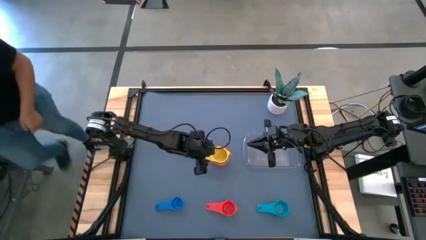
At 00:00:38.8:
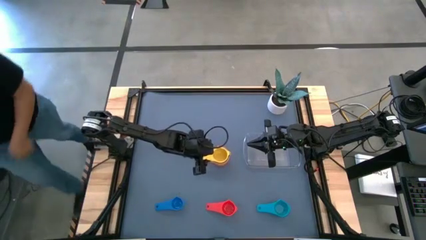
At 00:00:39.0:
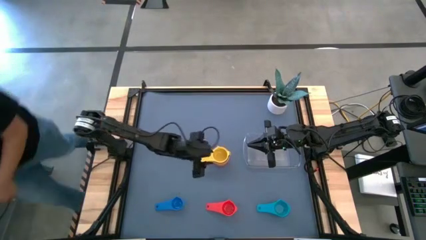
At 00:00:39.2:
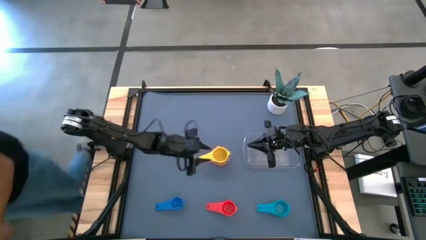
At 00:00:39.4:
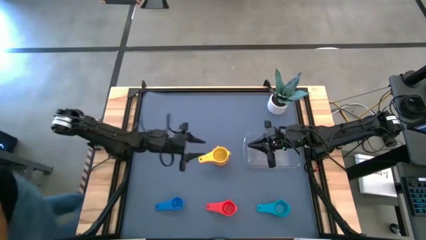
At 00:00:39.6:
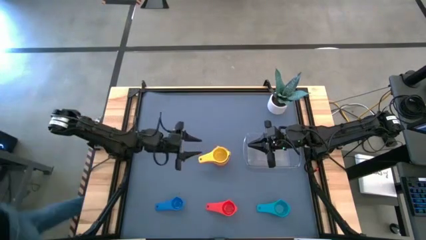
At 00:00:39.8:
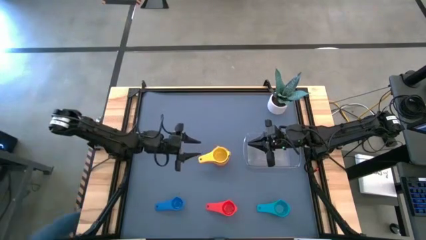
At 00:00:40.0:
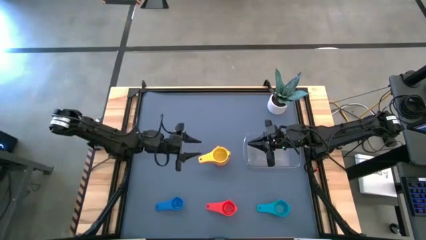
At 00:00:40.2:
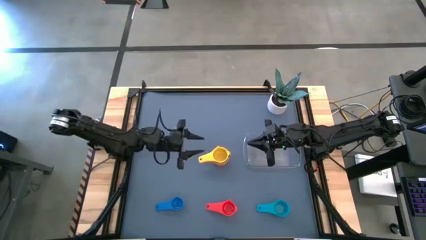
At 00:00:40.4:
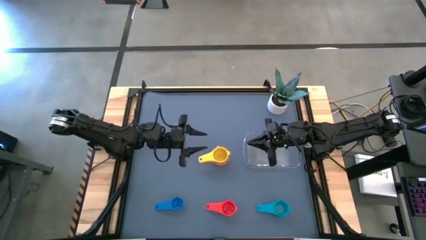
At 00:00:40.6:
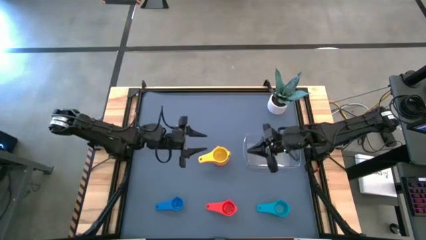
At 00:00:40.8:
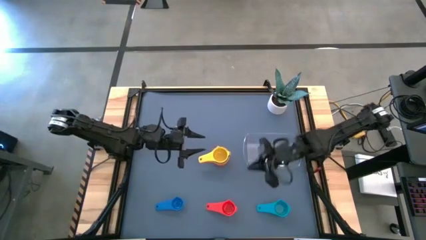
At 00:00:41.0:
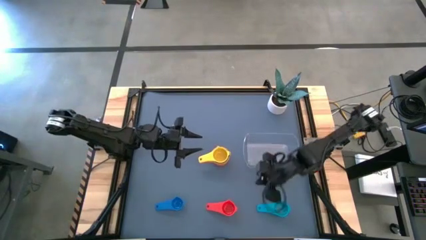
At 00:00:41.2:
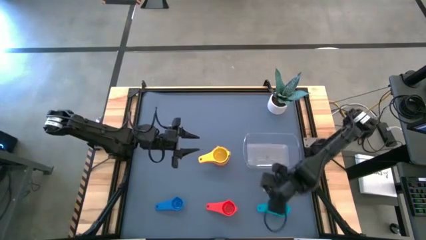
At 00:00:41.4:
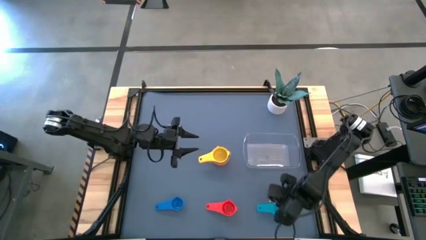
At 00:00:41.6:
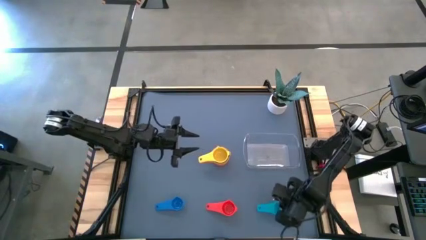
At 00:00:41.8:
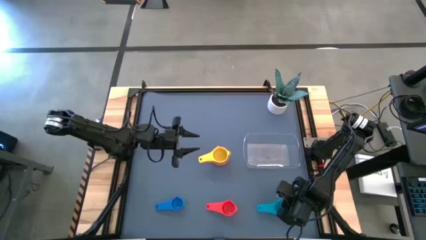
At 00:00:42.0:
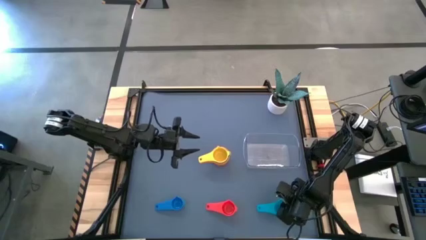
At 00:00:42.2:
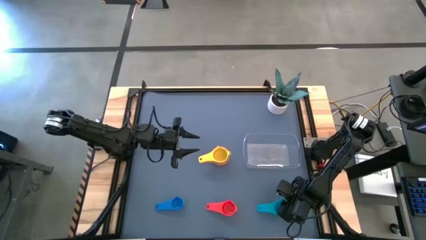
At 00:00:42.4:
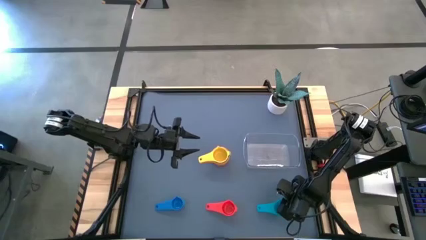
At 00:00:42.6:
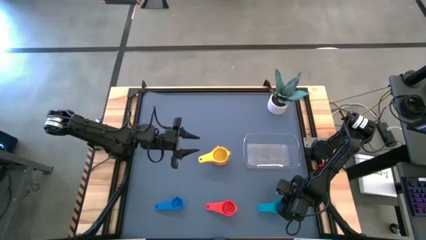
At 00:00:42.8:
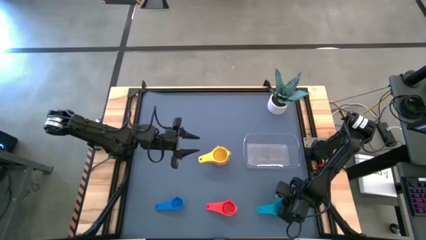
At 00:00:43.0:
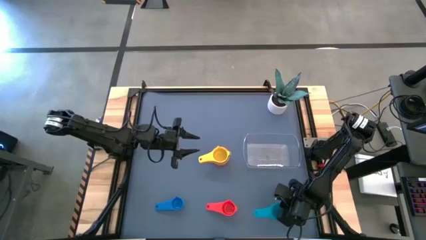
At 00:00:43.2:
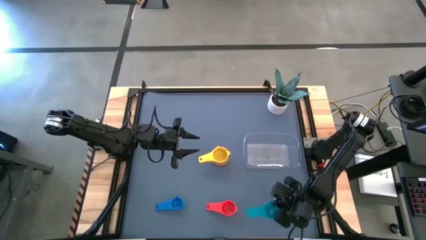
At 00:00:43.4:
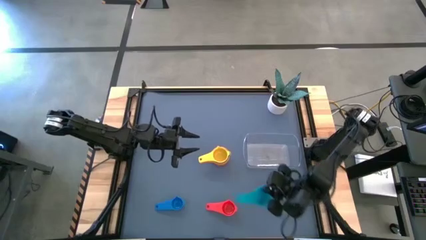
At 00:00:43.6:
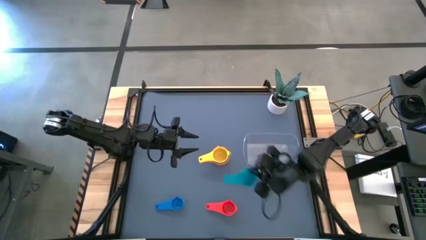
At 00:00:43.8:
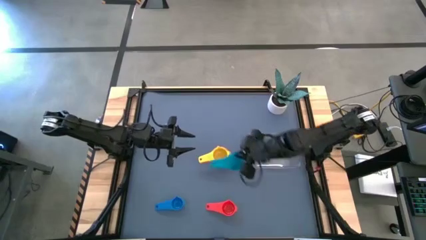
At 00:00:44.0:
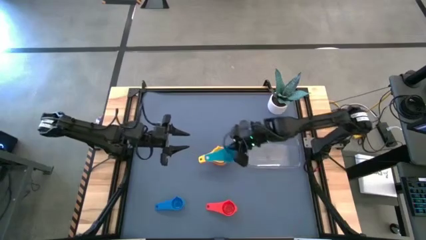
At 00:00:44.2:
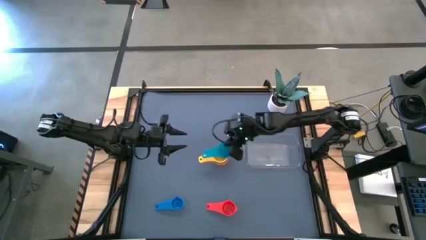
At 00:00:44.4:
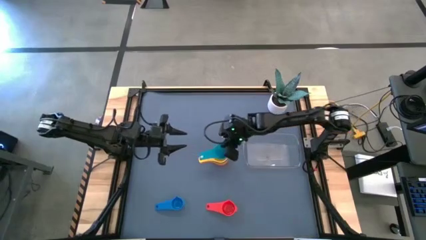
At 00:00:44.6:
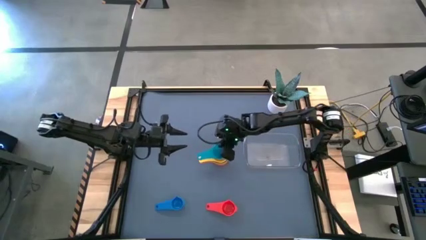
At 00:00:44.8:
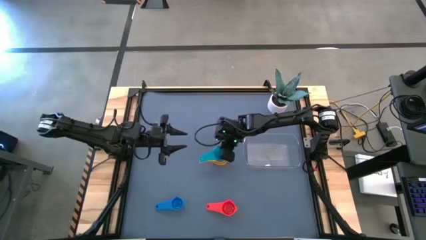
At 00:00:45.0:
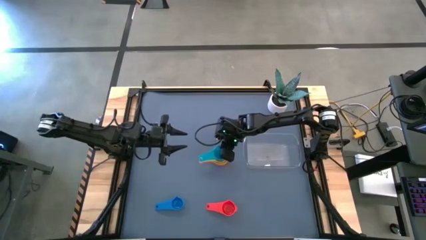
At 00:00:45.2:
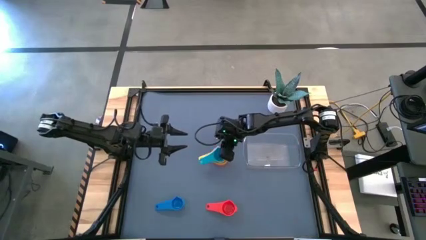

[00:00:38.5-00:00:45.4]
Task: Nest measuring cups in basket
Stack the light blue measuring cup on top of the yellow measuring cup

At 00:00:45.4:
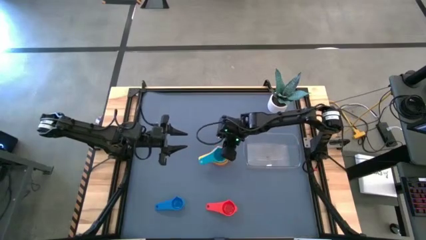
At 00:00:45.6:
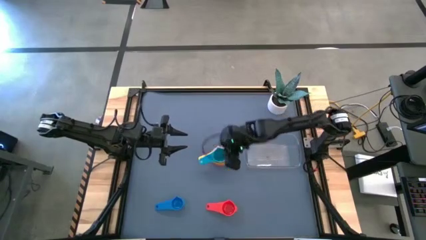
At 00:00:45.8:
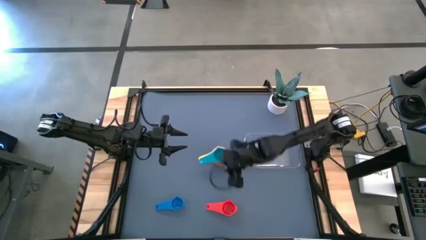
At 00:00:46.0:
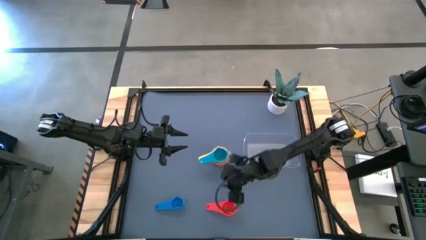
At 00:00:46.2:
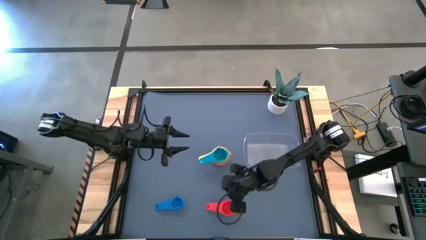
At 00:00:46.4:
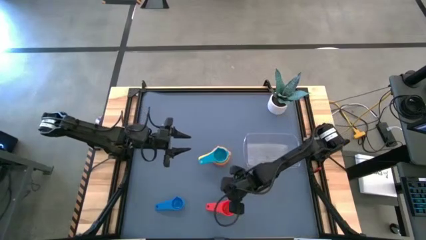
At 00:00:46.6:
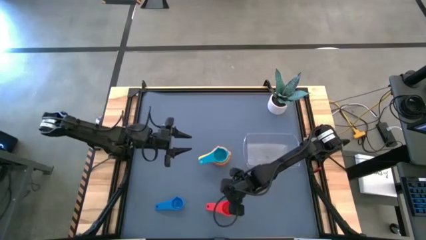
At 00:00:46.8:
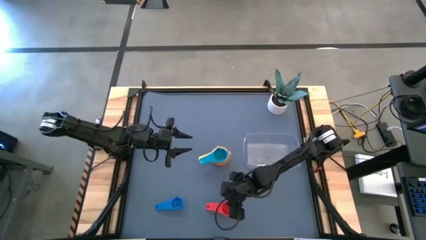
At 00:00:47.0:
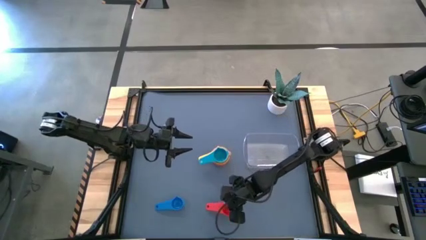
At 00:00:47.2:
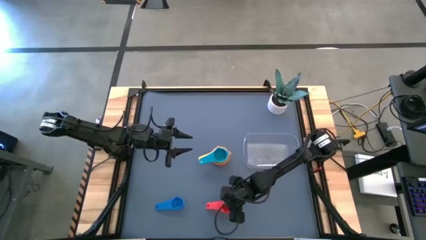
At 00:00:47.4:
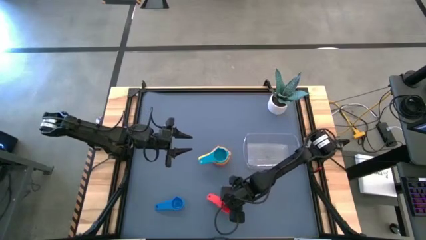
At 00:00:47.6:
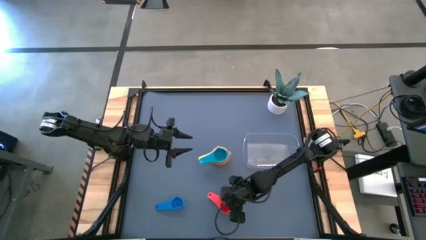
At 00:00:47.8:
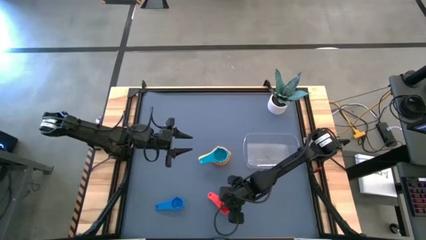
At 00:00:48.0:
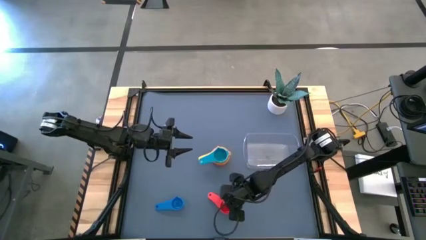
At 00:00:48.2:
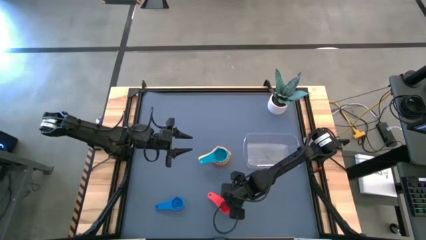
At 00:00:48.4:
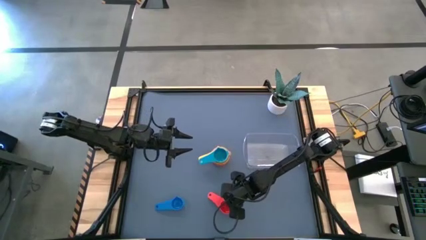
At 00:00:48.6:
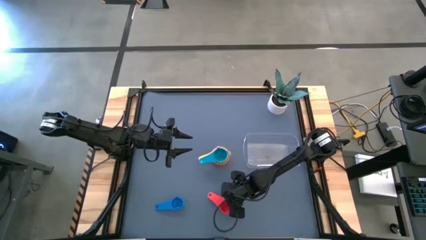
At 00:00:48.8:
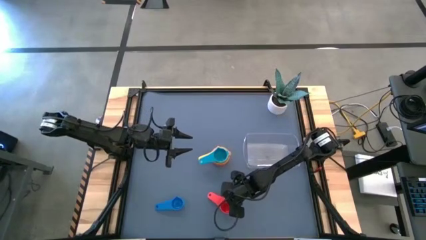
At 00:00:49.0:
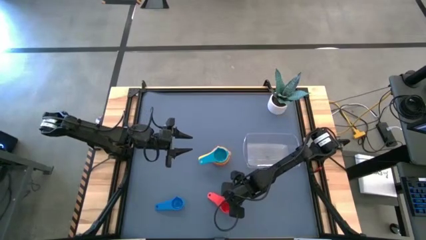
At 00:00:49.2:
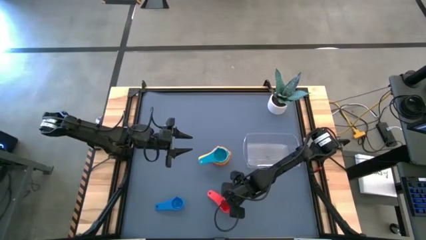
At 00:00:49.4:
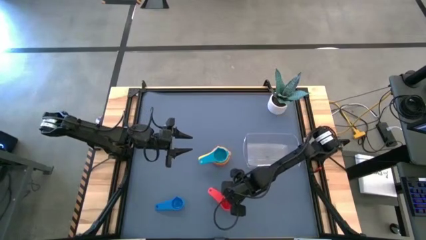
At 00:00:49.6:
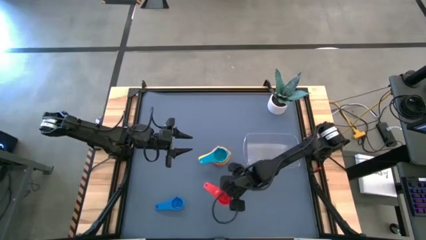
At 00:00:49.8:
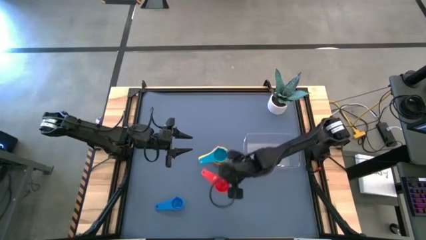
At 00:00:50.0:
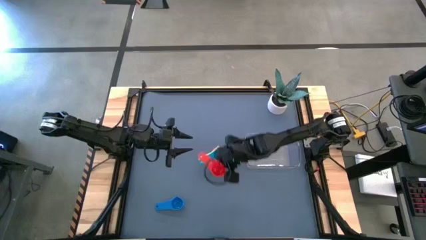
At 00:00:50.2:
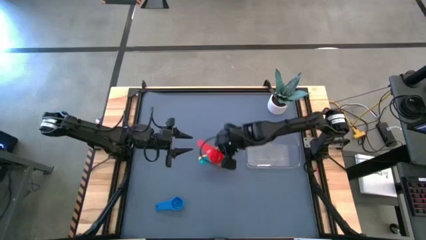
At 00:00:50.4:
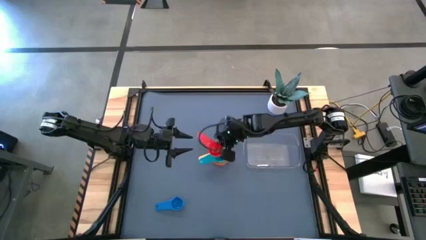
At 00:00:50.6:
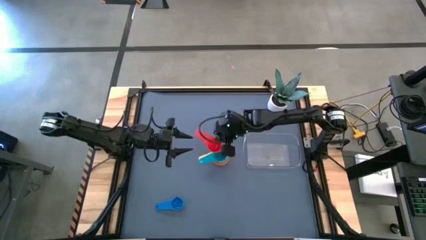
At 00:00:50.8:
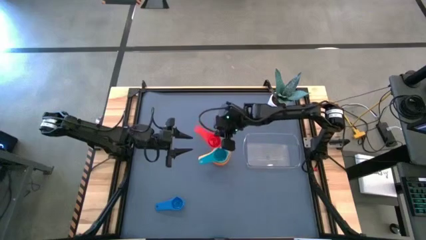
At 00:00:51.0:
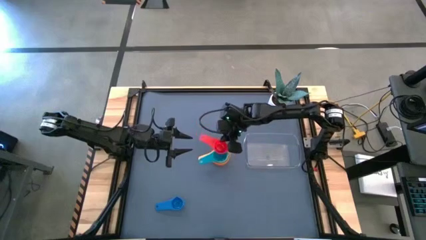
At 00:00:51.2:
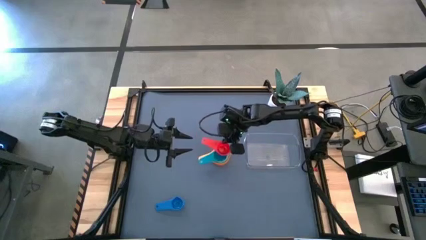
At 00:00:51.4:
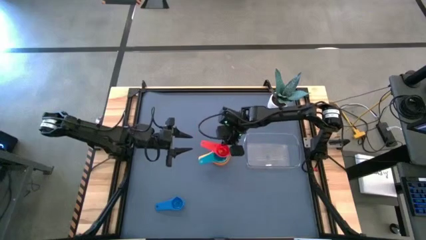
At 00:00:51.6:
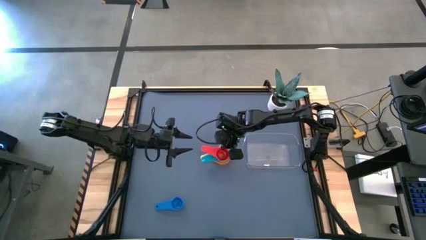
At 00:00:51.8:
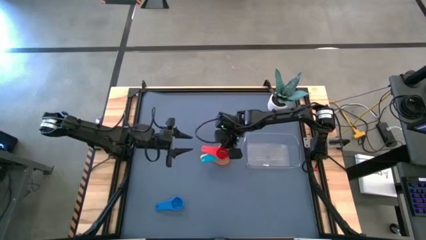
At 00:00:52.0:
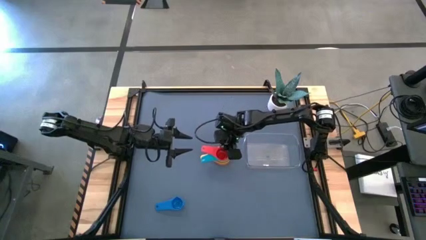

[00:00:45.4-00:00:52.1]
Stack the red measuring cup on top of the light blue measuring cup
